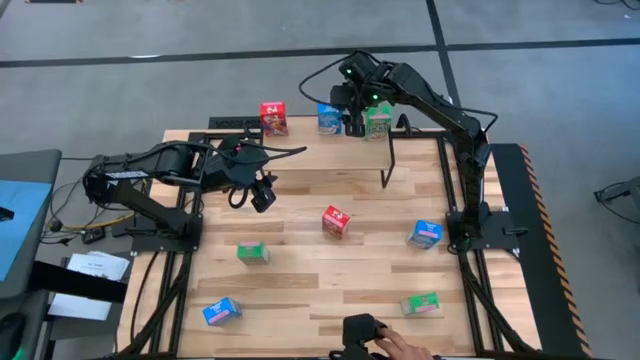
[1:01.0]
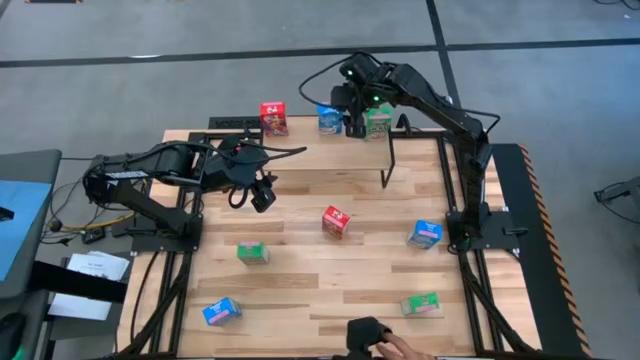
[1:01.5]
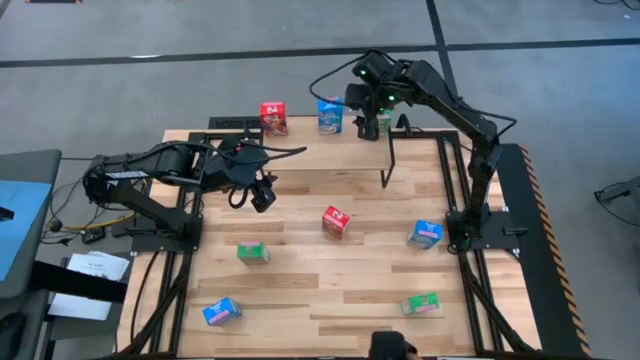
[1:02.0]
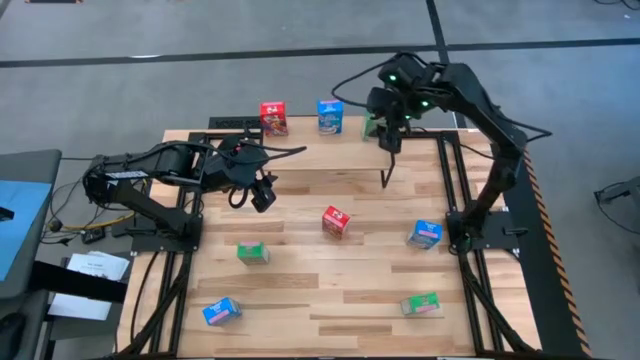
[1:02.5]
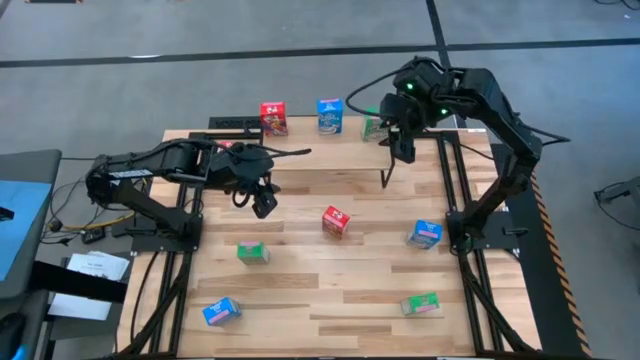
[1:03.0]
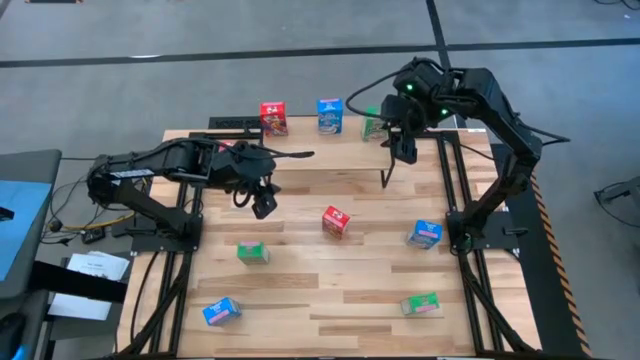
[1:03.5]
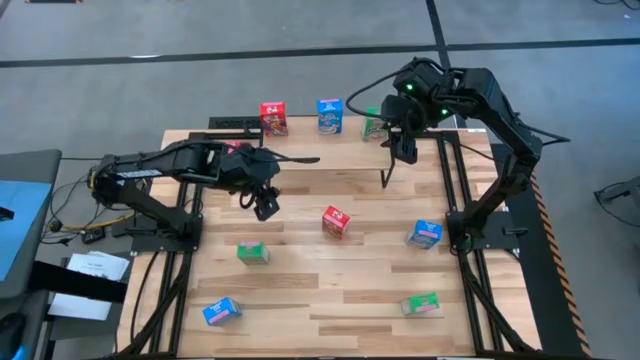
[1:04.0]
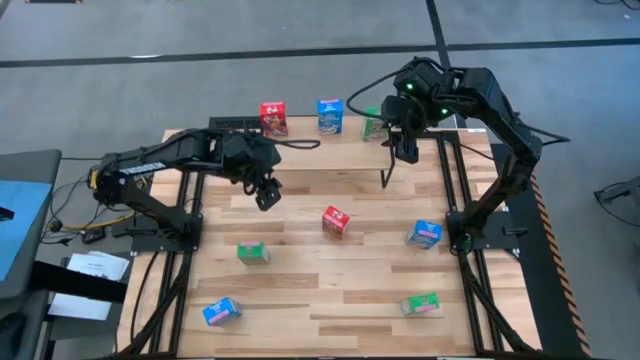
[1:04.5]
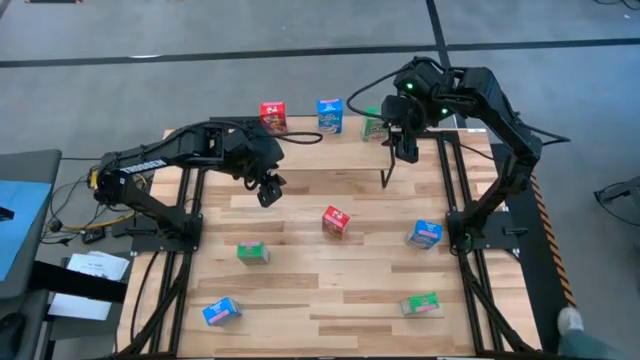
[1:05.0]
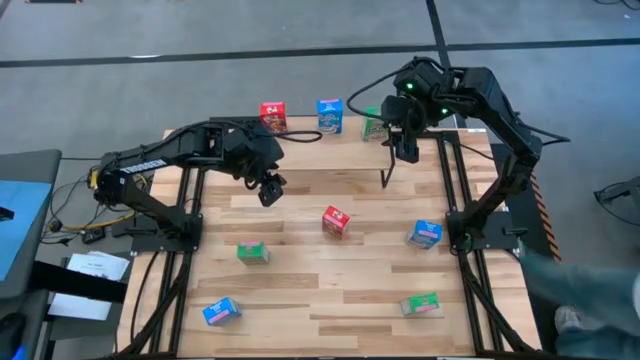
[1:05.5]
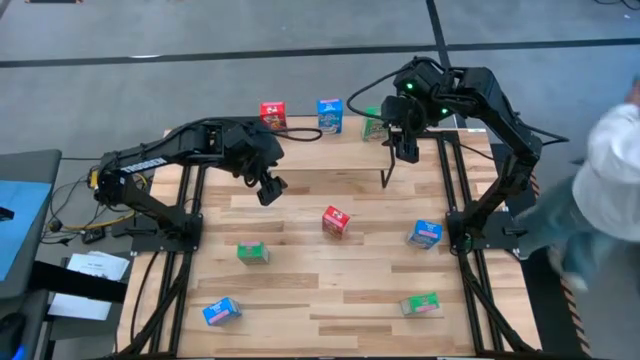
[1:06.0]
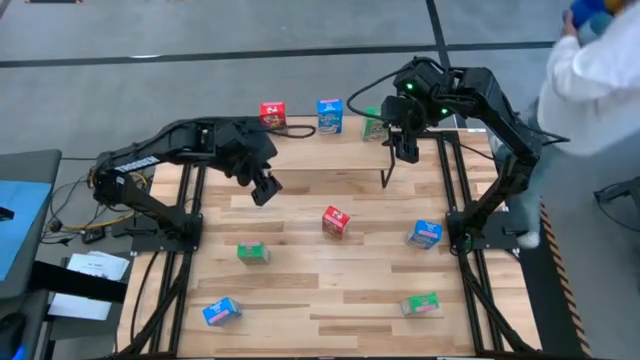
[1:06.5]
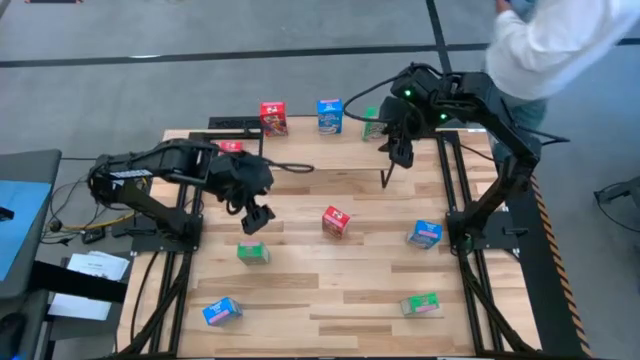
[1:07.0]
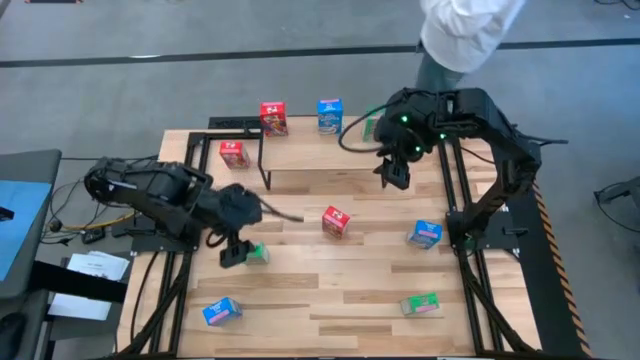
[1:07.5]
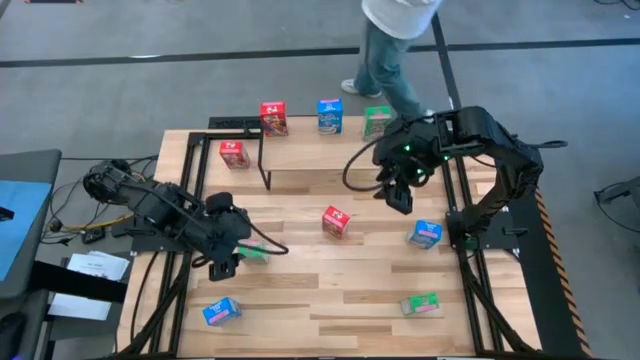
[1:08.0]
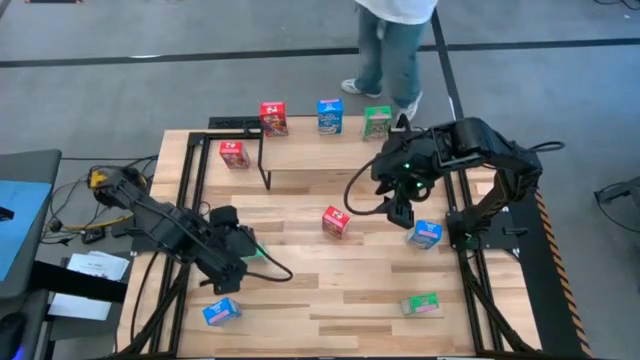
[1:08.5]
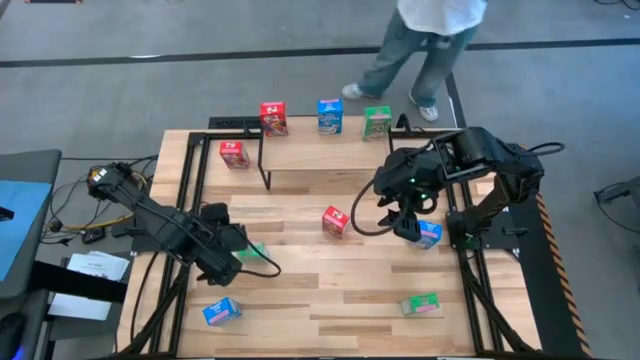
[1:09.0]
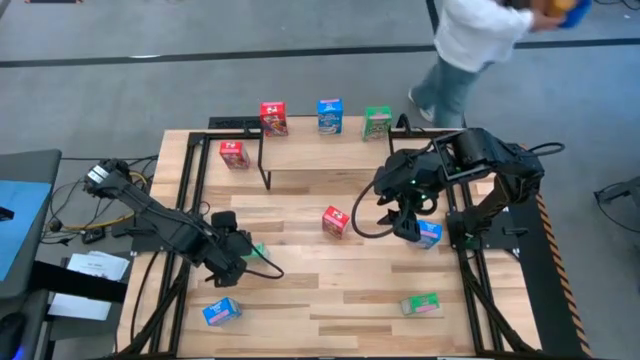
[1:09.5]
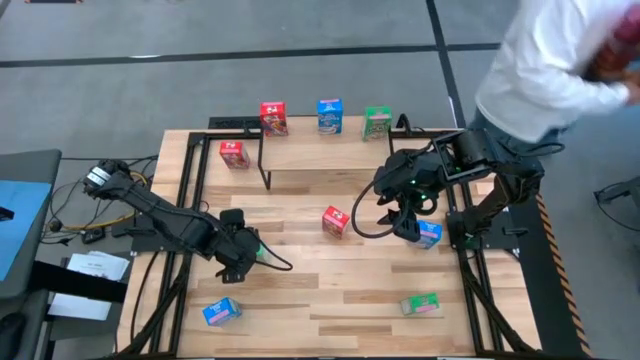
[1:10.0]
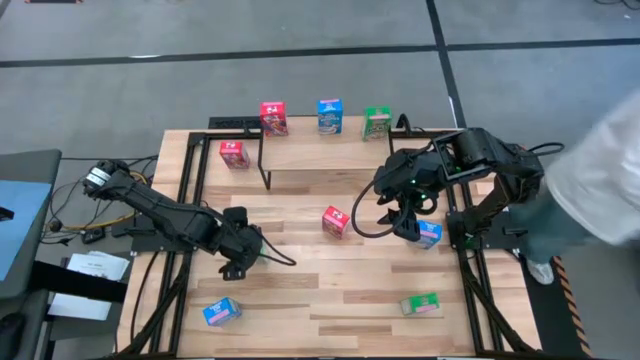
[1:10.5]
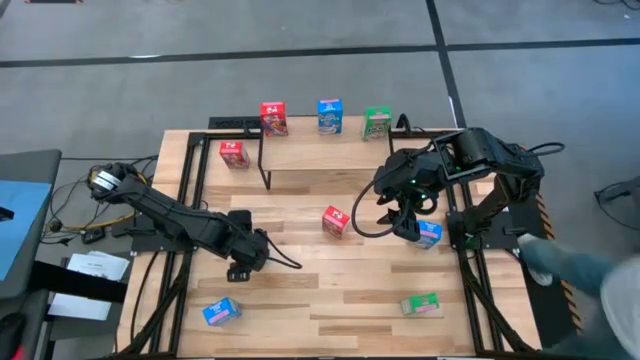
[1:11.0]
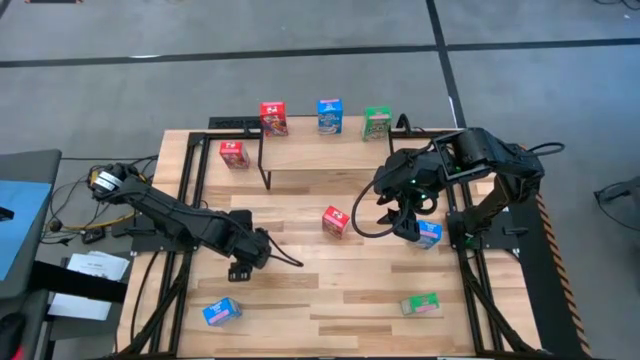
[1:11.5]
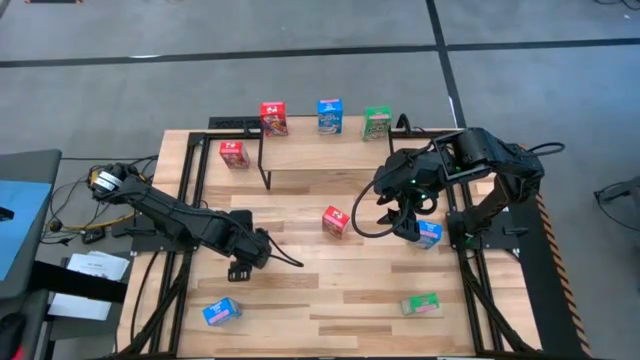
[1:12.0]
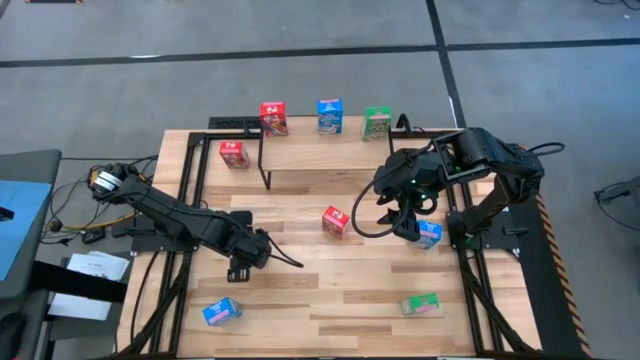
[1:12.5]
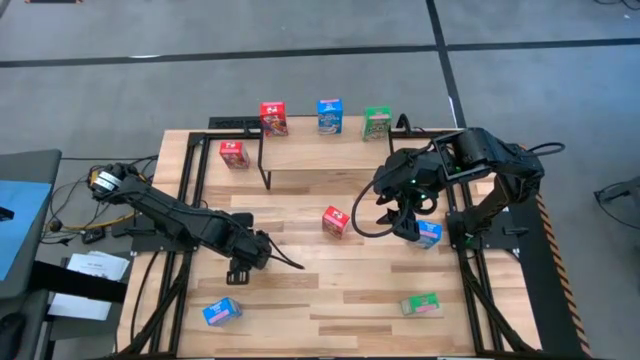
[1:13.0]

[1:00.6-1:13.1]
Task: Stack cereal on shelf
Put the top green cereal box on the shelf aligned with the other green cereal box

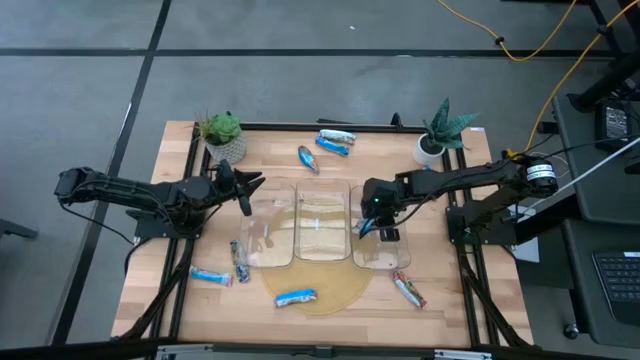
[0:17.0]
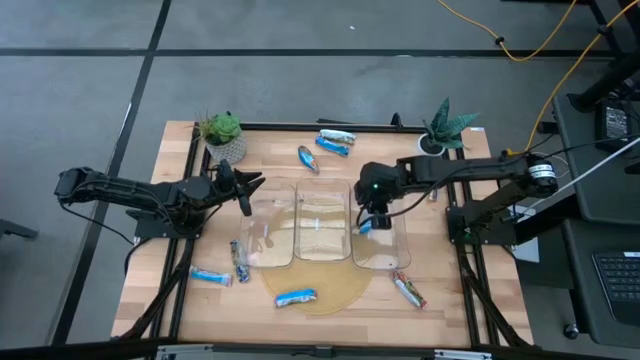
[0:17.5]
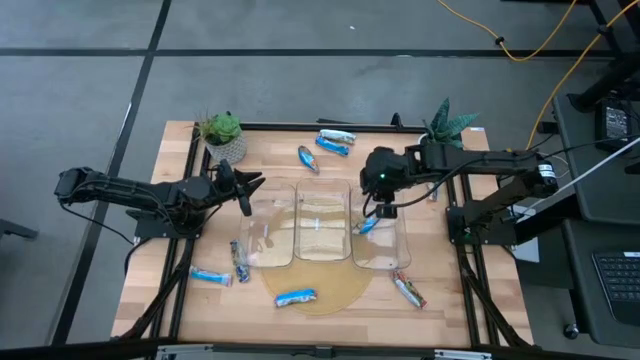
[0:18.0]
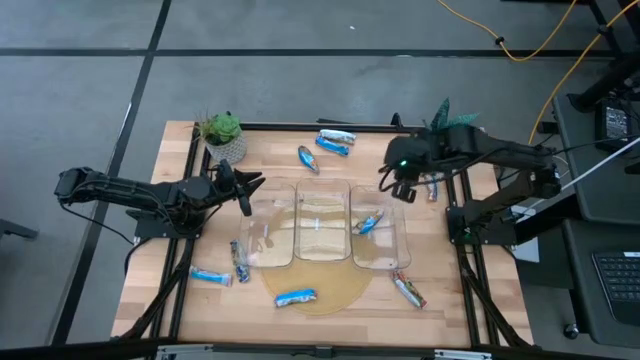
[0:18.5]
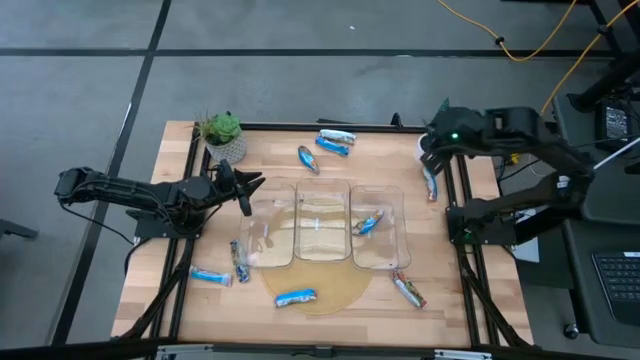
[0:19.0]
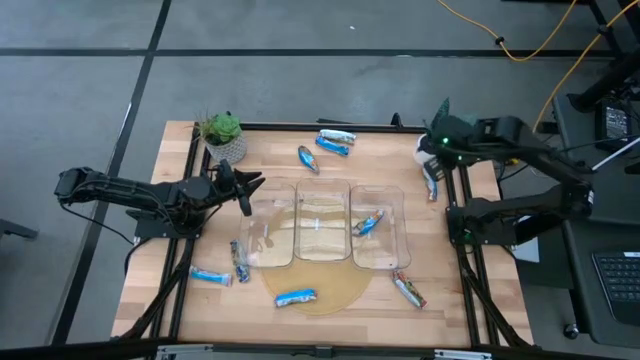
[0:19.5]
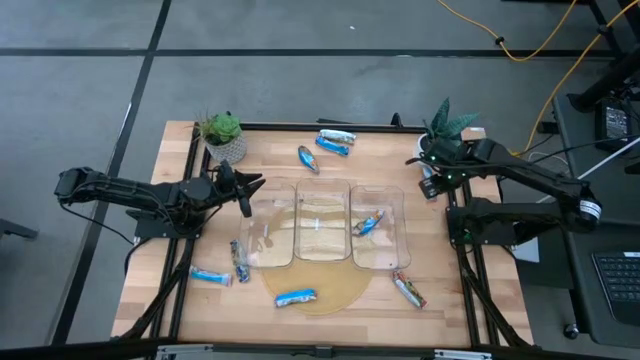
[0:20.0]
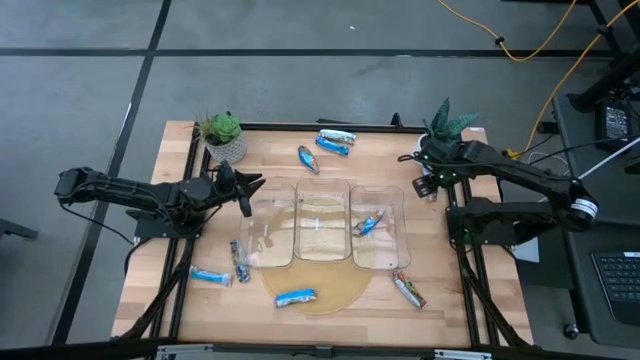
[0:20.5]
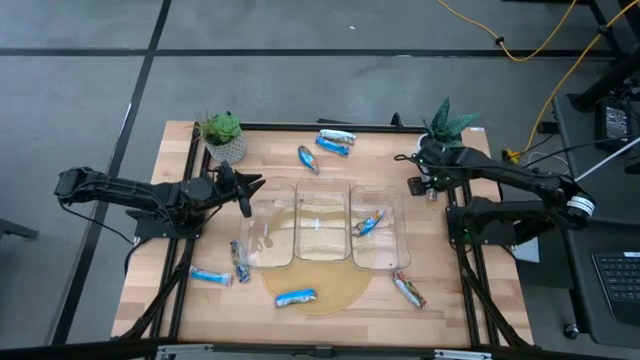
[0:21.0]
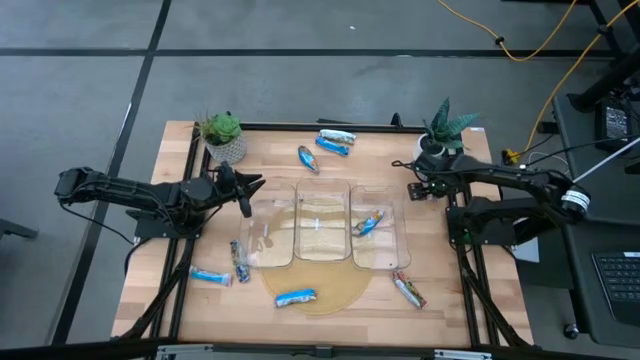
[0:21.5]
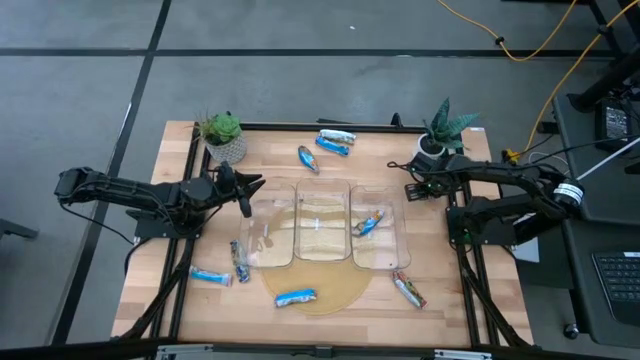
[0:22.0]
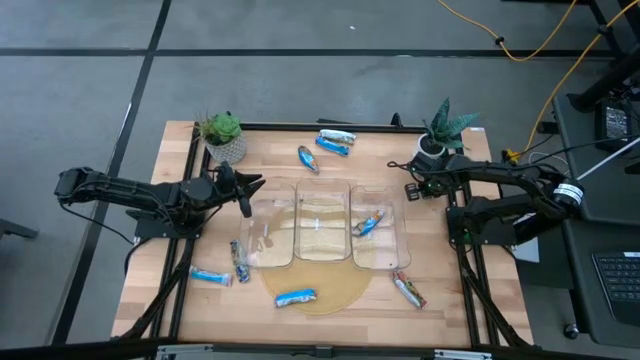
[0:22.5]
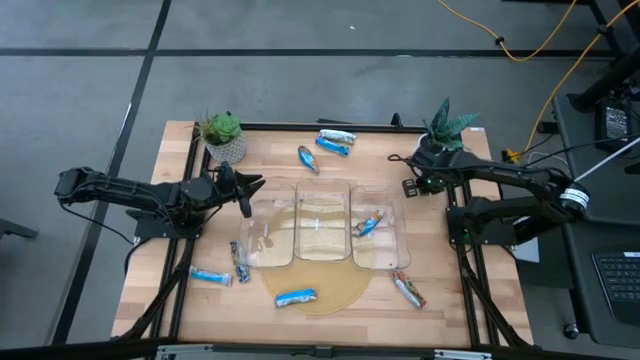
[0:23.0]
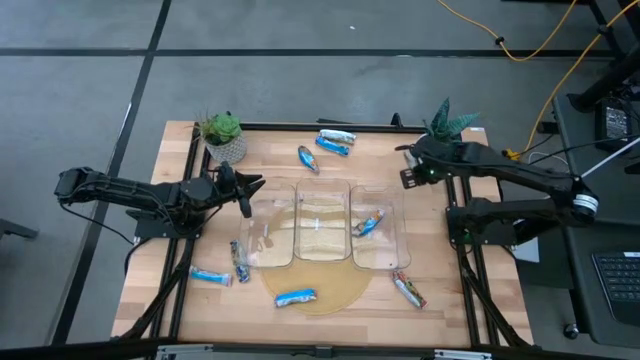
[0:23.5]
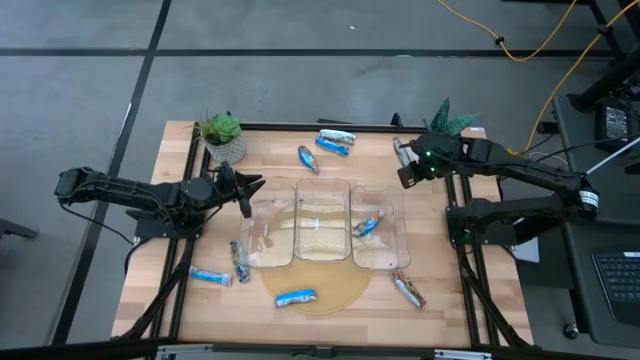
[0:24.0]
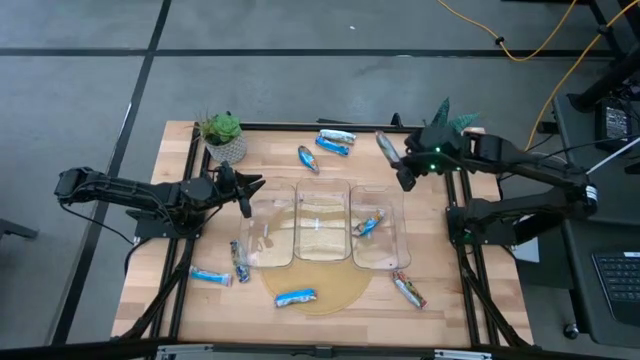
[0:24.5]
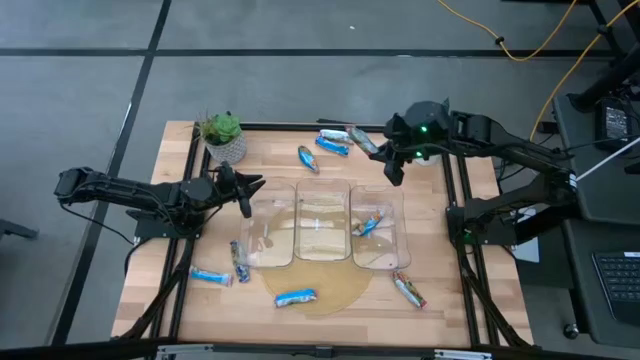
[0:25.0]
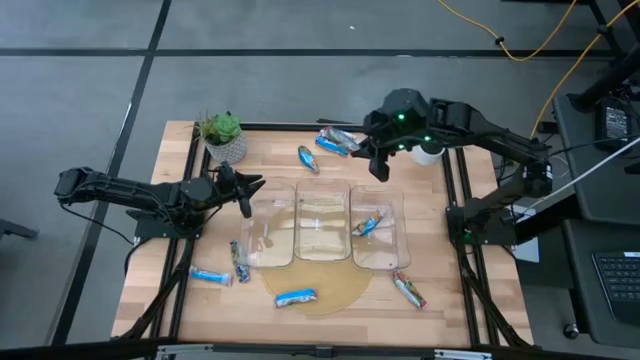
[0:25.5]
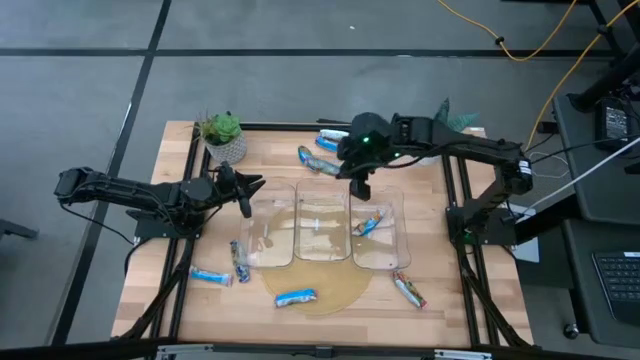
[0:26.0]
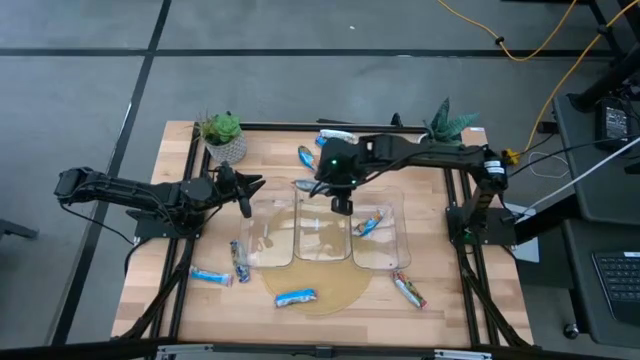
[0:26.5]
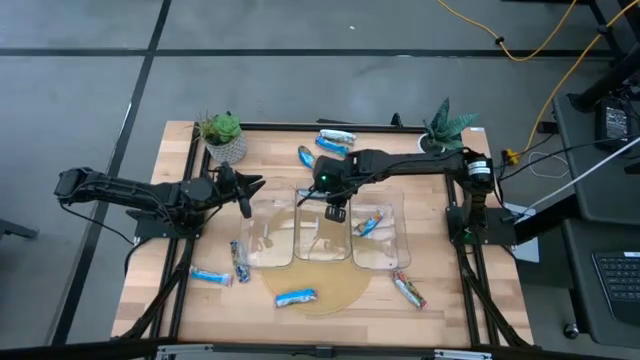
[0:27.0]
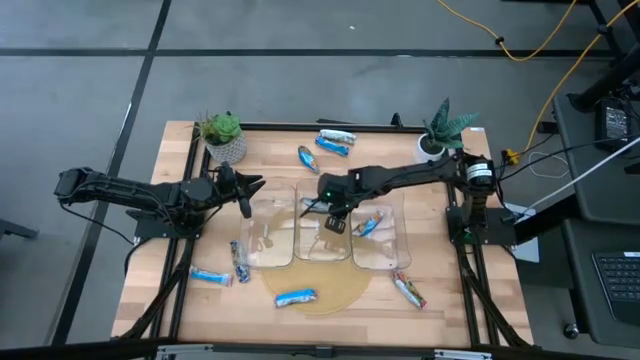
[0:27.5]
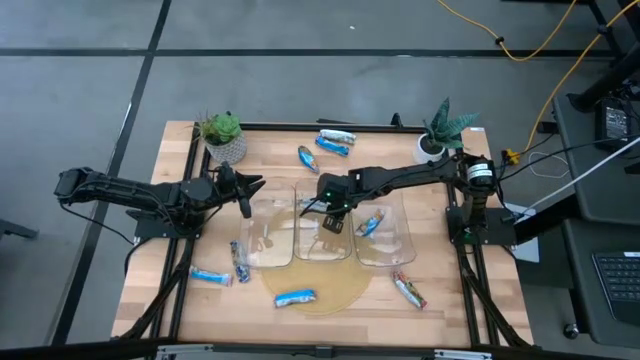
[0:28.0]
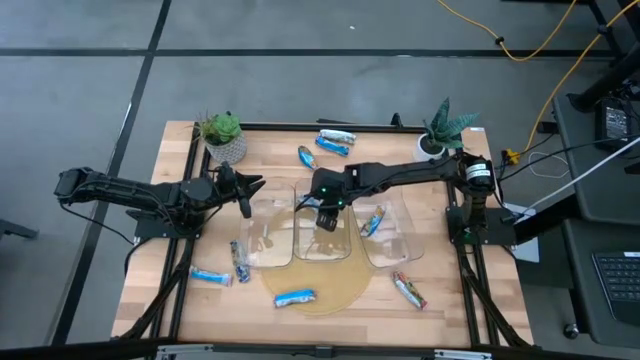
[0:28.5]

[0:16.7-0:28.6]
Task: Pick and place Granola Bars by type
Put the red granola bar into the middle transparent bin
